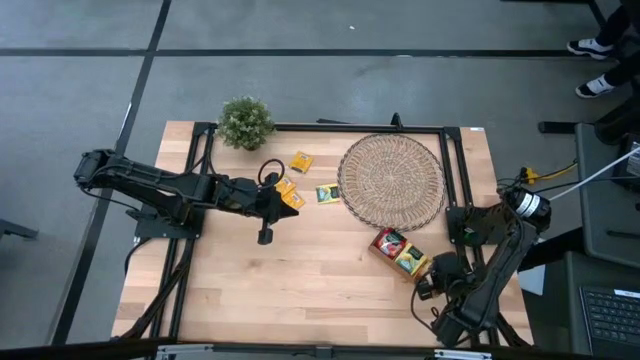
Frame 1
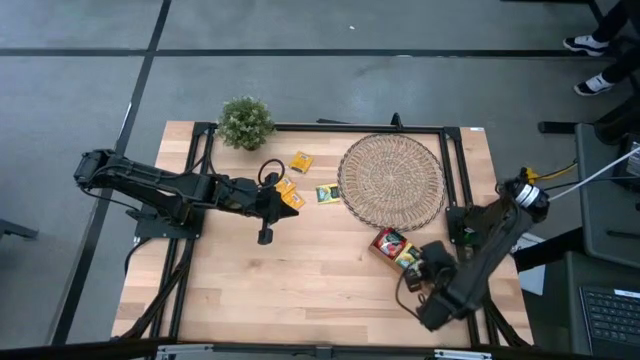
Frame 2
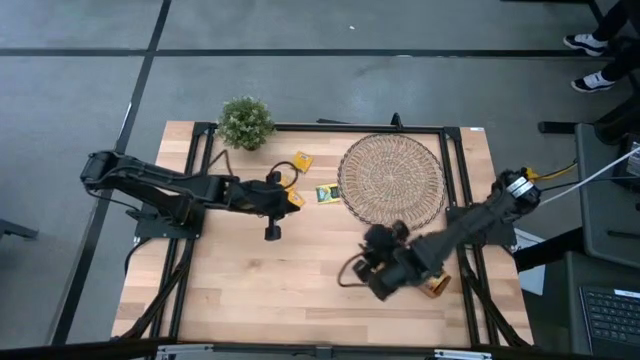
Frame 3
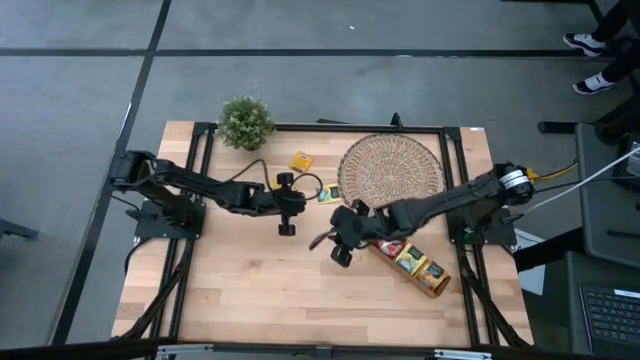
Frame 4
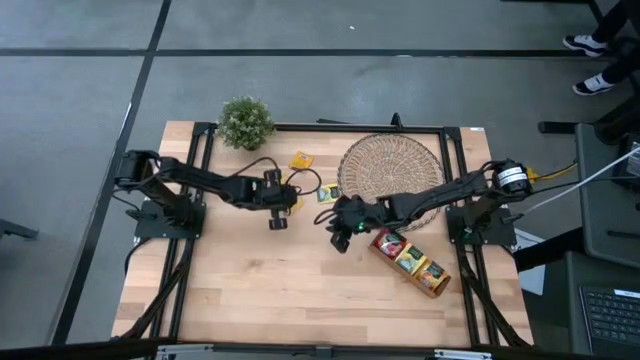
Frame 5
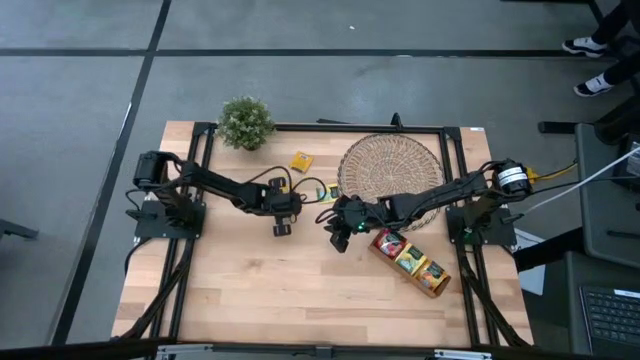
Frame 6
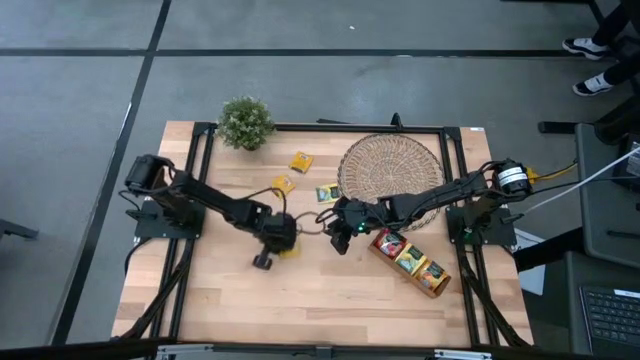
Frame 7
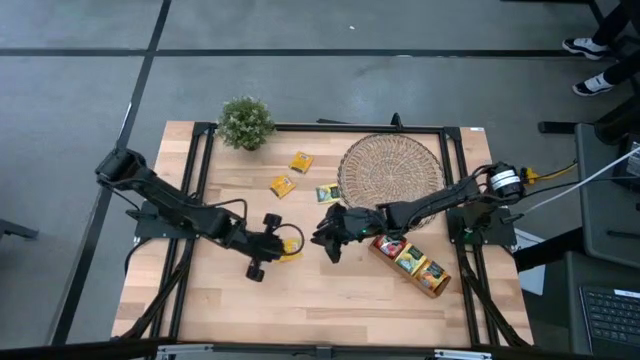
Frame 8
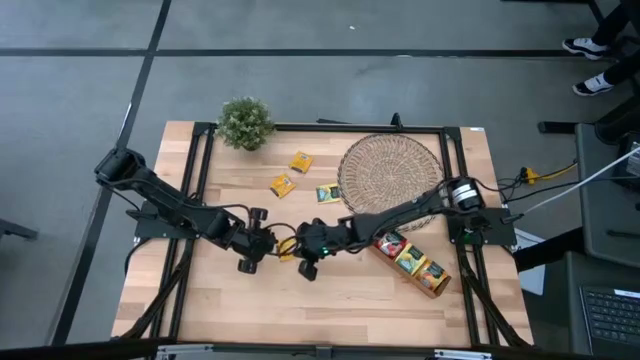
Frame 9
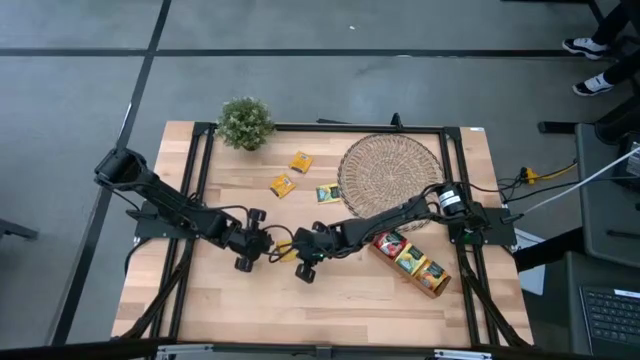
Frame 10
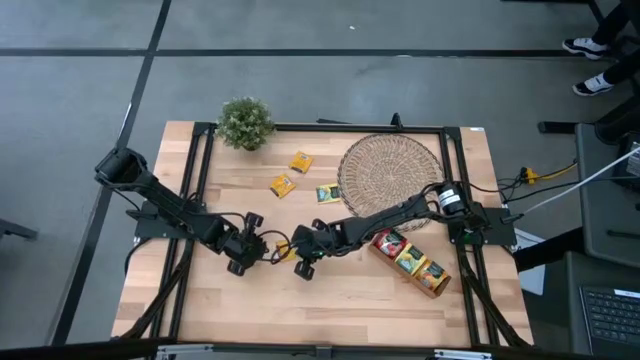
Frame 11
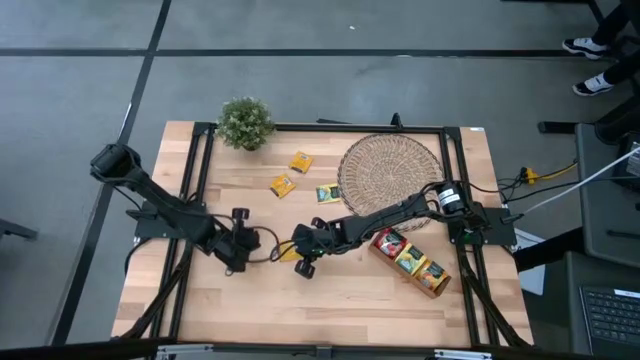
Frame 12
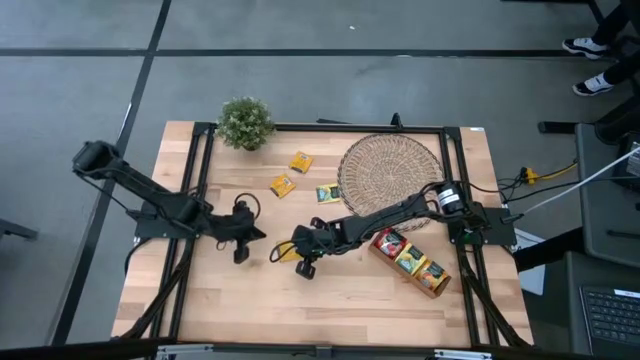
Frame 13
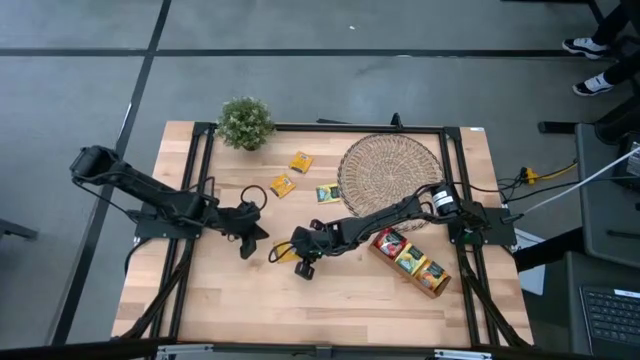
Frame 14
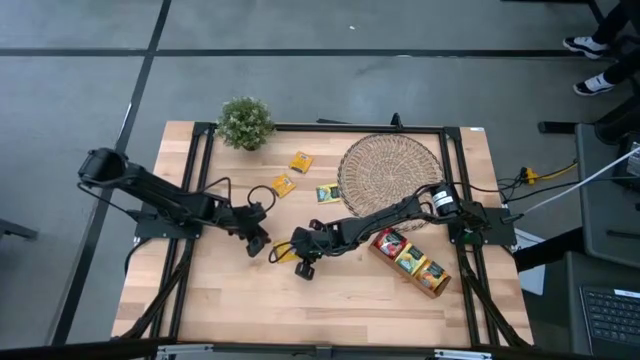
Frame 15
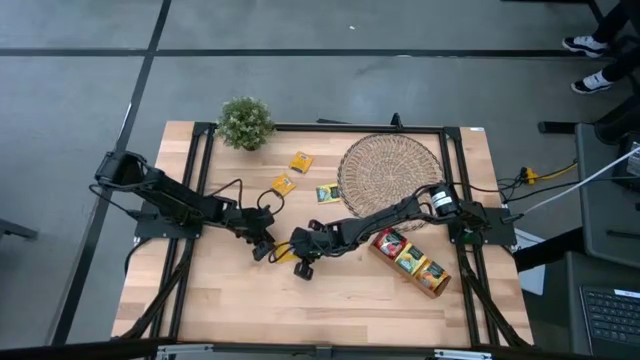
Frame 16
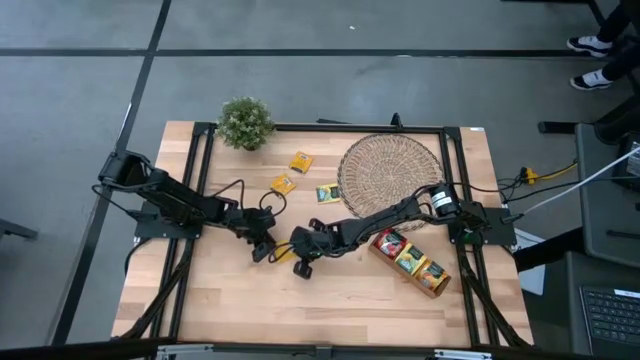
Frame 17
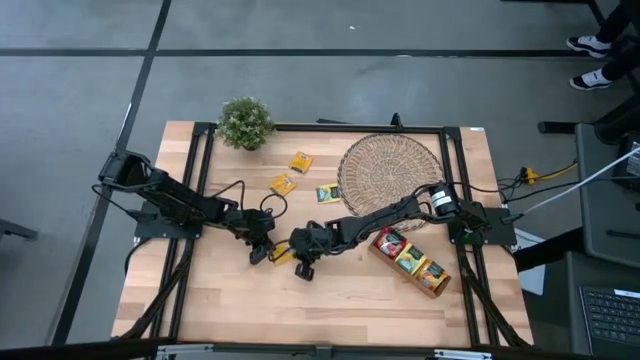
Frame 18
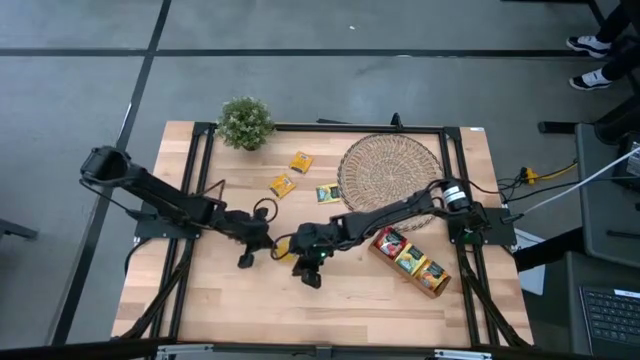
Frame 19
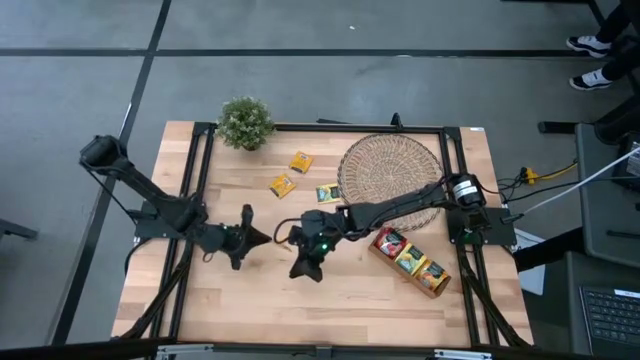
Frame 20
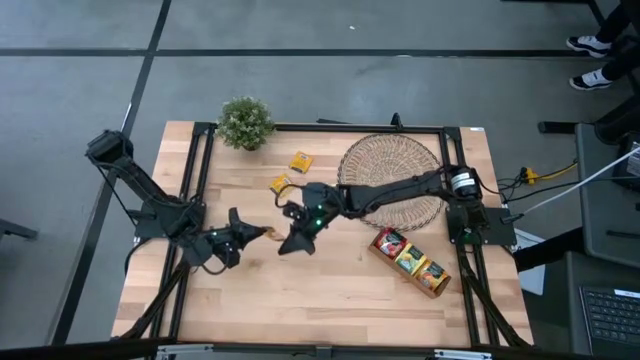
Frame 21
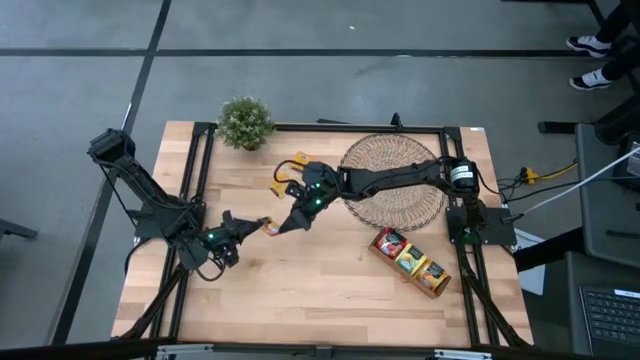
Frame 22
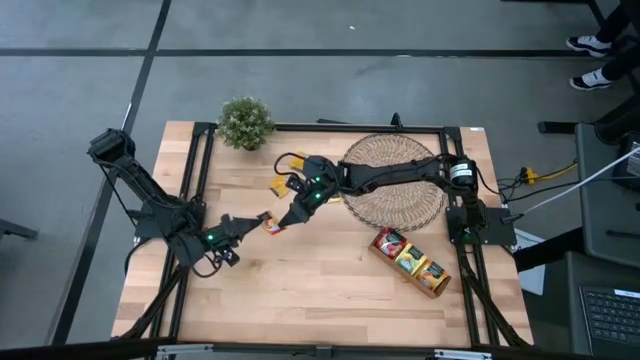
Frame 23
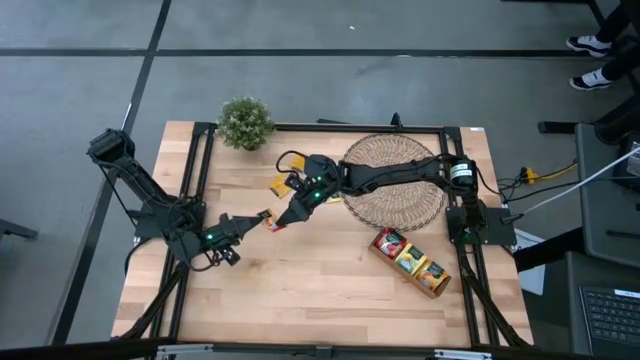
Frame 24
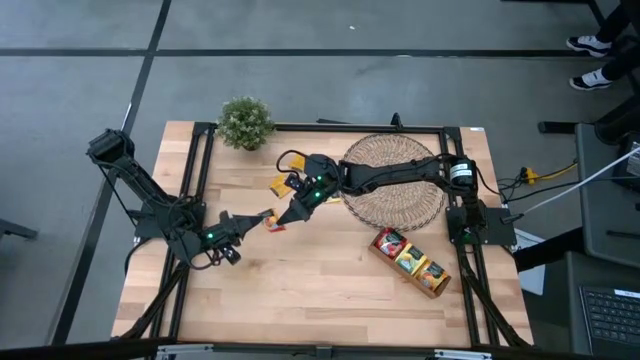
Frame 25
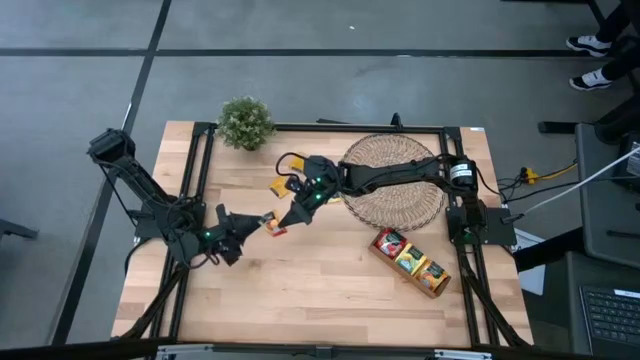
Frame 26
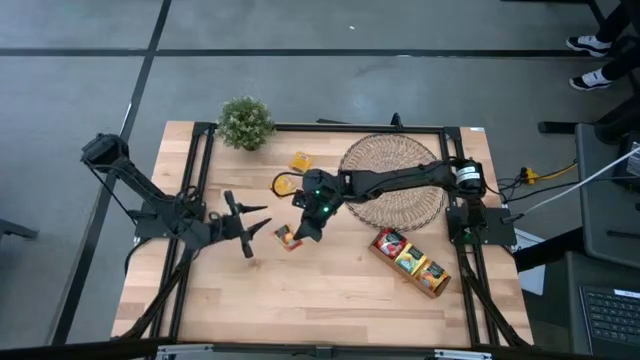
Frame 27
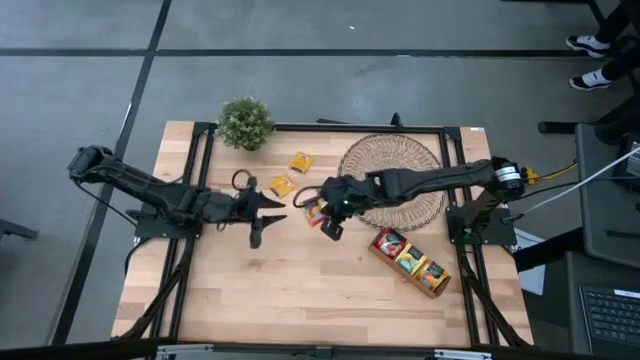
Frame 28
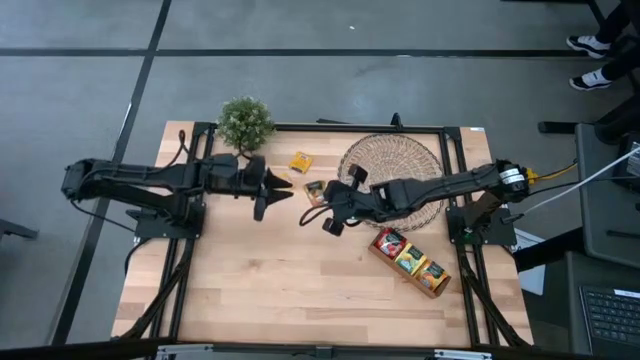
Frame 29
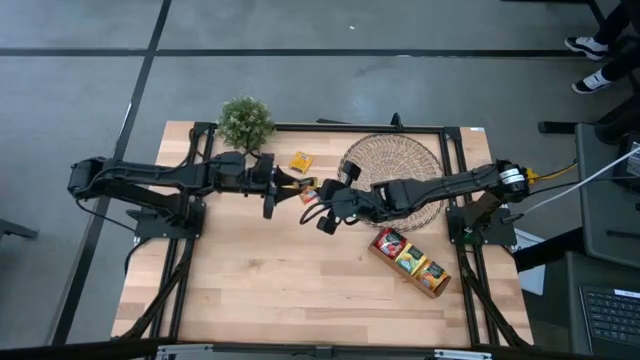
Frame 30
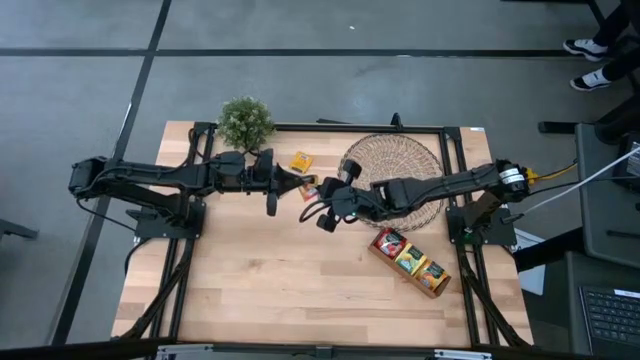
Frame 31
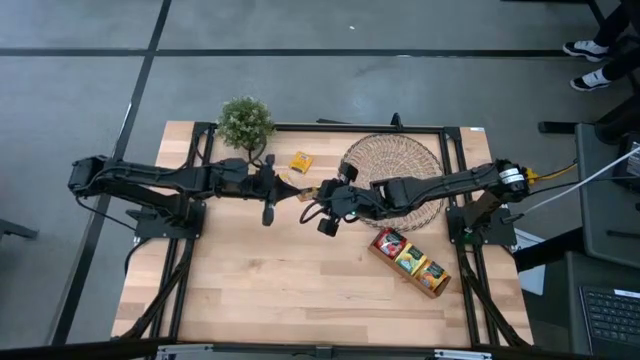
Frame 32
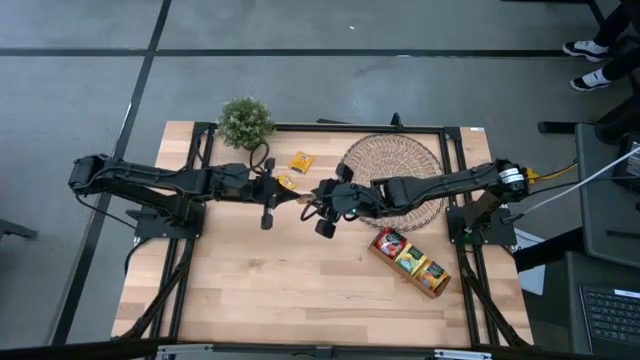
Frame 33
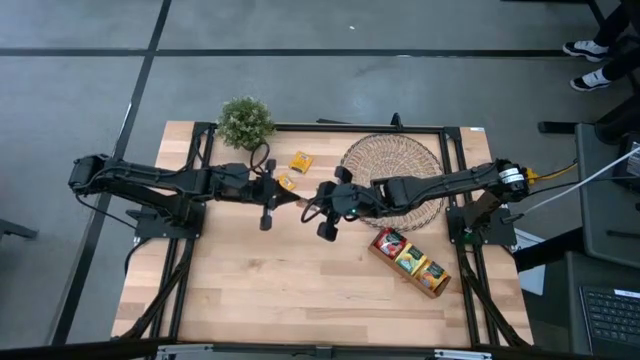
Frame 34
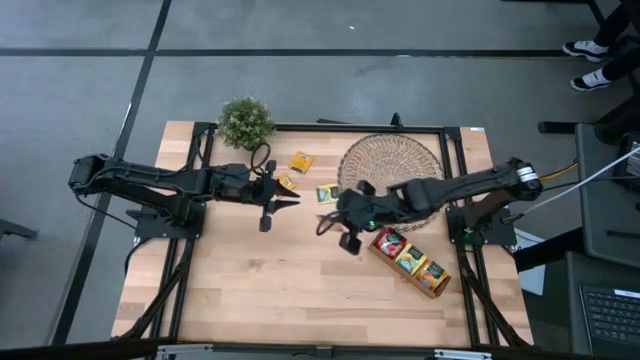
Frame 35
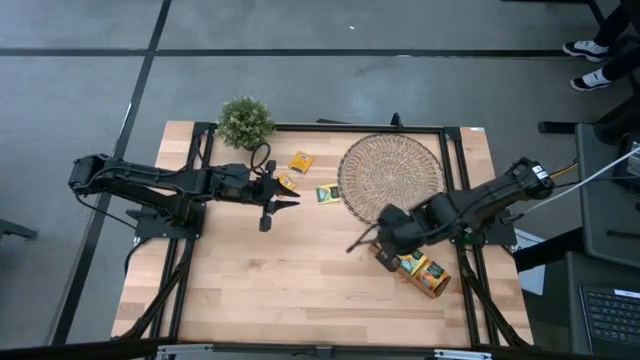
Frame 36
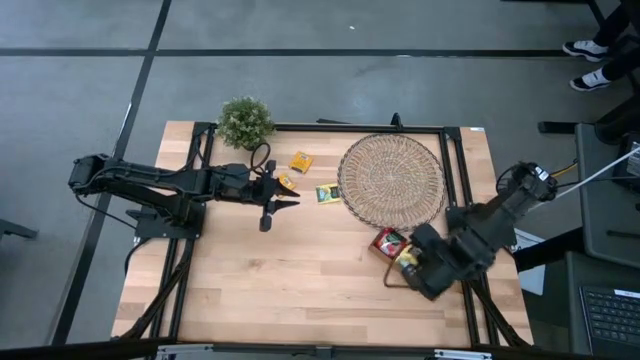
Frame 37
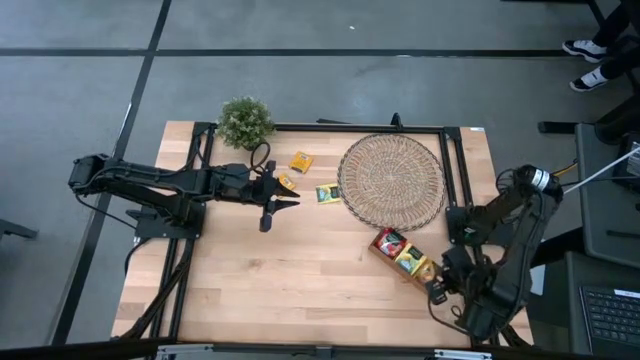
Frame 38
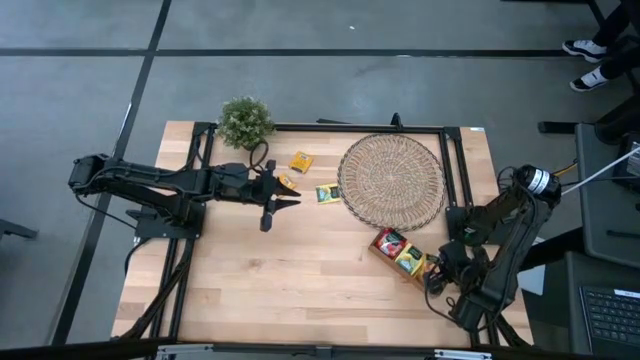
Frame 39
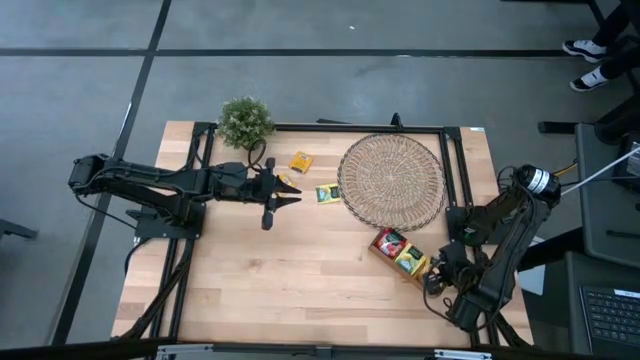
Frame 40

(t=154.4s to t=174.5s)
Task: Pick & Place Tea
Put the bottom orange tea bag into the right slot of the wooden organizer

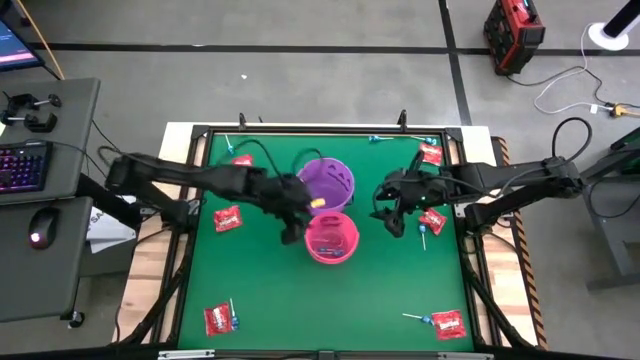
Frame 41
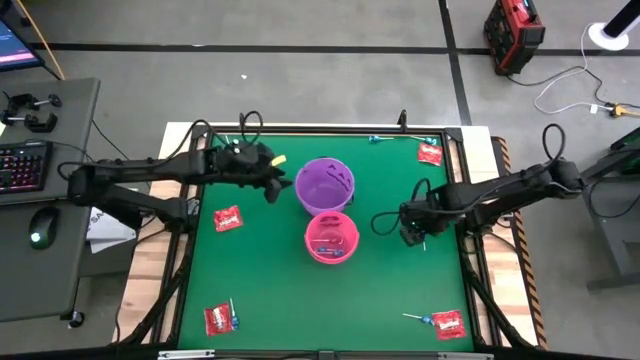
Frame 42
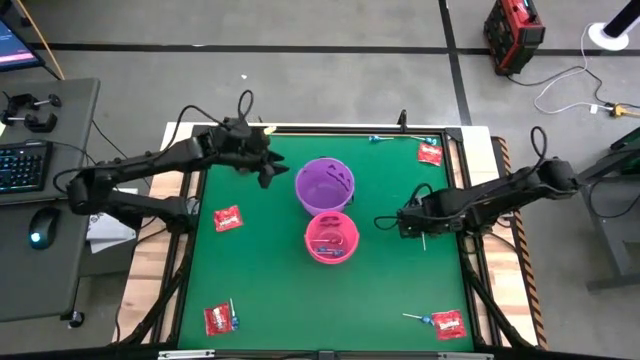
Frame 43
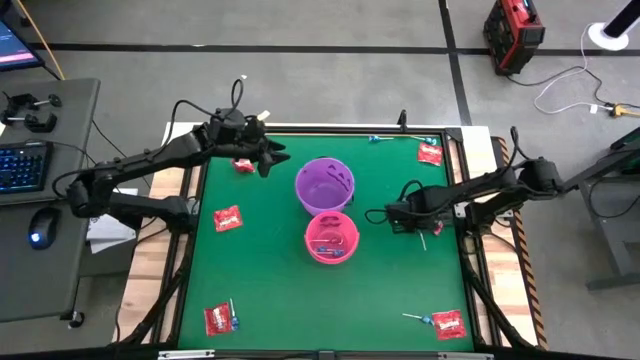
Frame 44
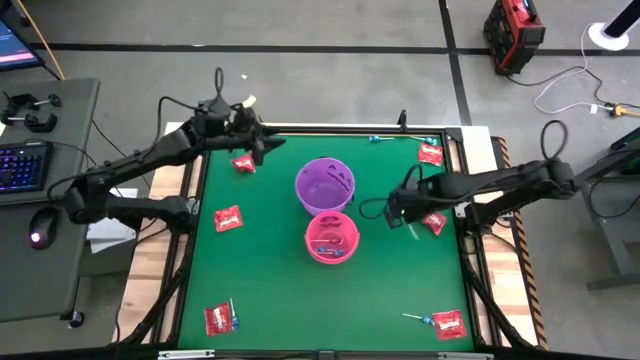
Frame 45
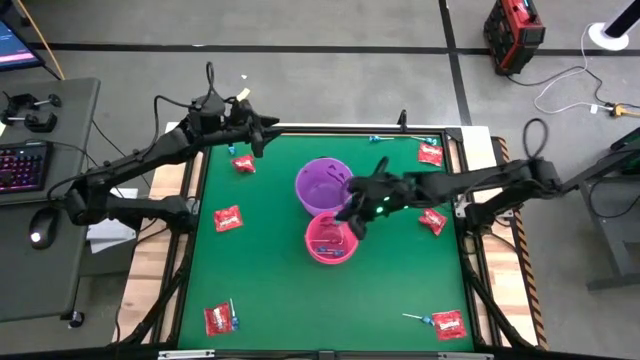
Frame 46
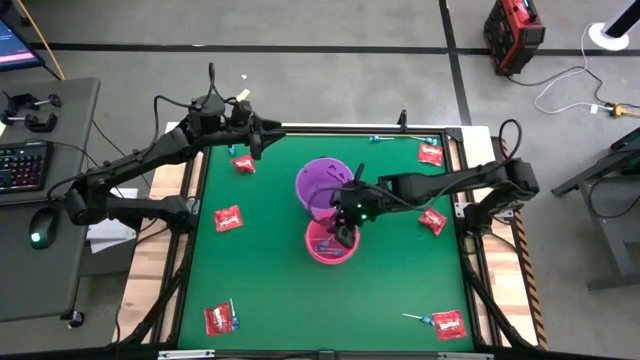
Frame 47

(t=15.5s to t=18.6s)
Task: Sort candy by brand, put in halloween buckets
Put the blue candy into the pink bucket
